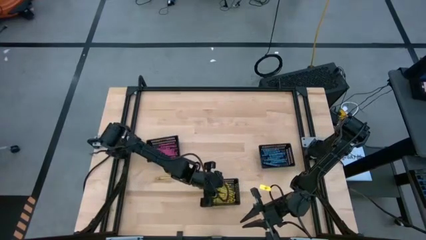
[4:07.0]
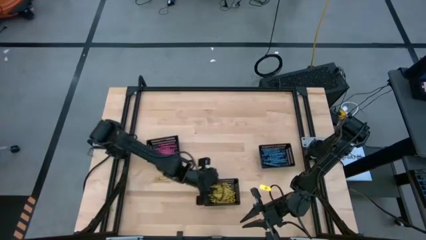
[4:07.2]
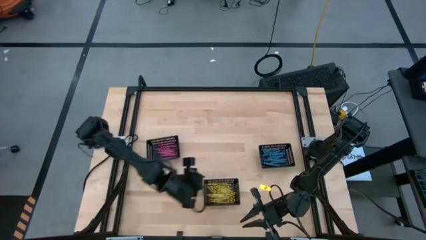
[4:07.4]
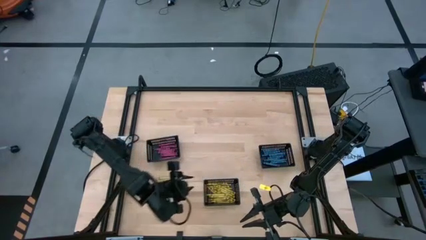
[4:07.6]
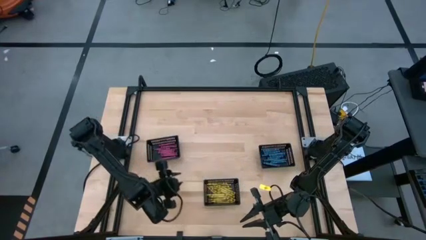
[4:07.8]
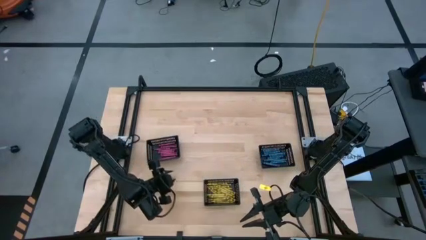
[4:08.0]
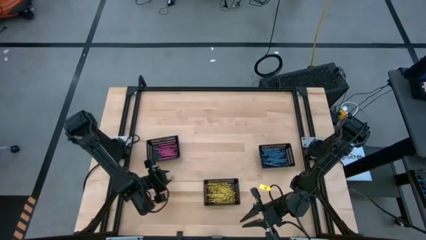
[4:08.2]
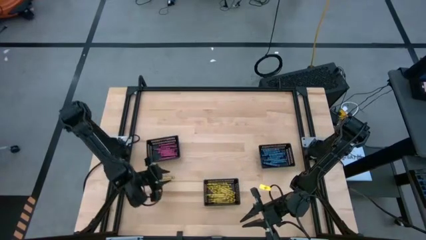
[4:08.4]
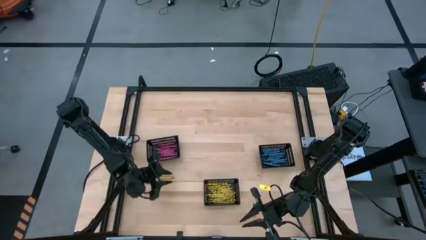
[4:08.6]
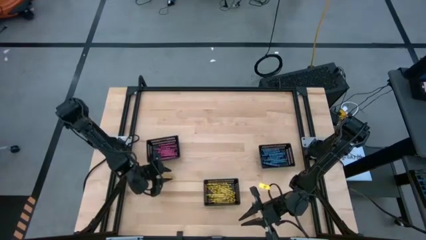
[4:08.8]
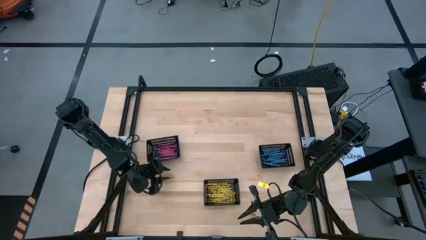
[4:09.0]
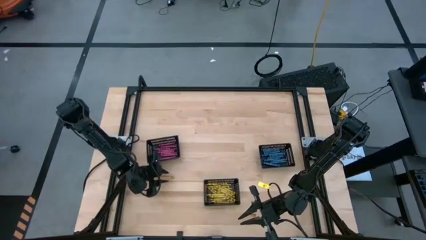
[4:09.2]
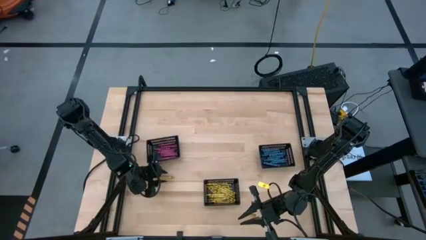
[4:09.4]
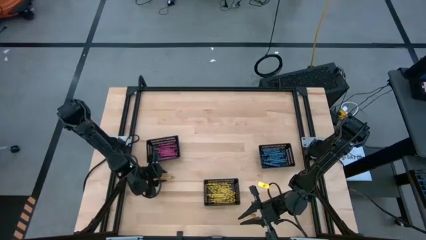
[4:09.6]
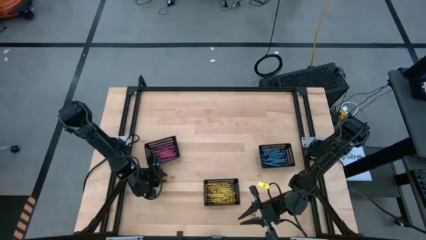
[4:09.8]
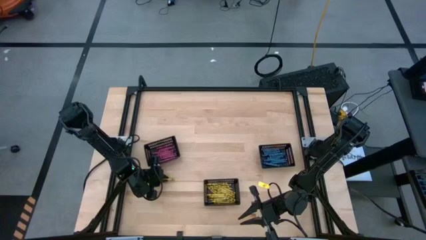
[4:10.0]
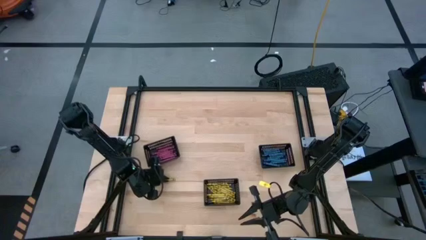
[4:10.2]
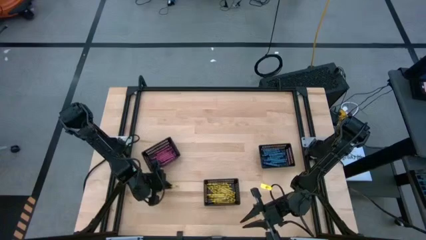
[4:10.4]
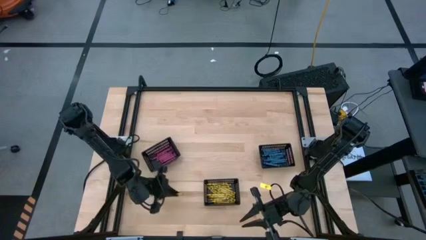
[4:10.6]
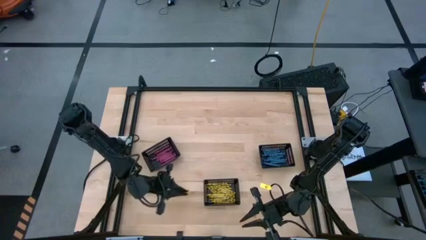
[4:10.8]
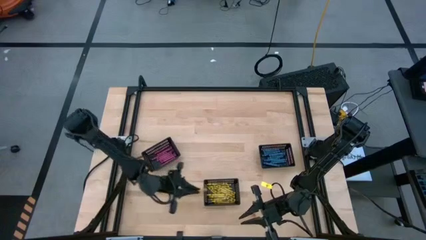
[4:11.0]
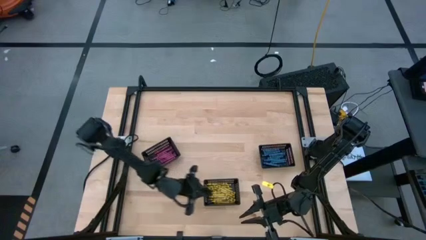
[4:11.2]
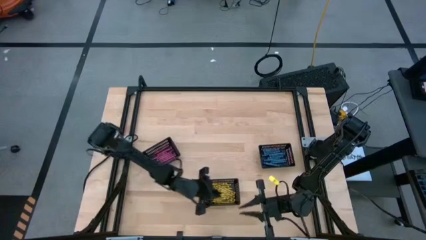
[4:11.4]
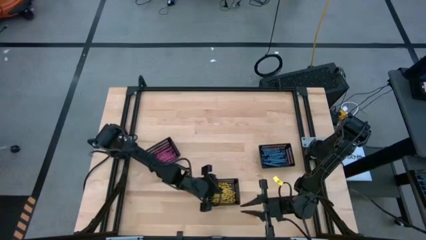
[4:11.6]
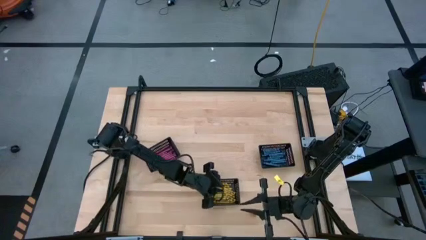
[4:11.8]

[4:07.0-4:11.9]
Task: Sort crayons
Put the yellow crayon into the bottom black bin

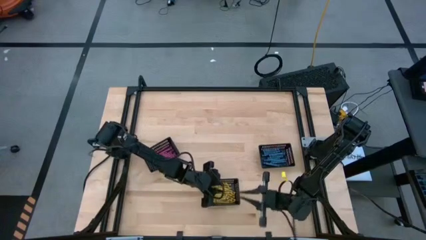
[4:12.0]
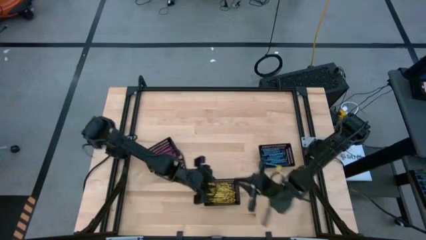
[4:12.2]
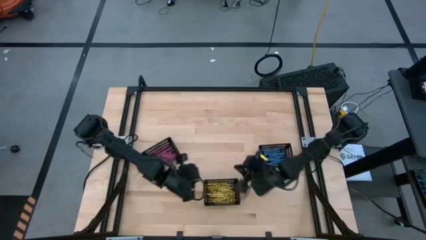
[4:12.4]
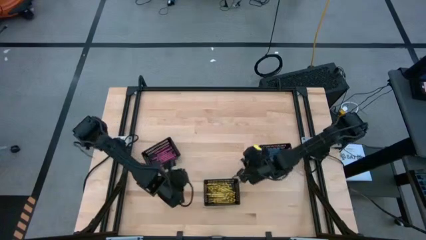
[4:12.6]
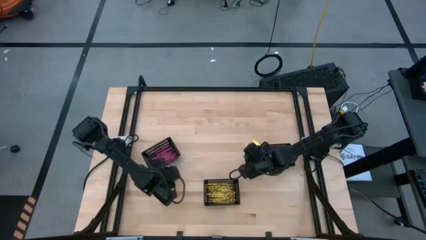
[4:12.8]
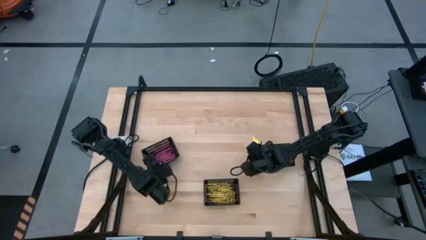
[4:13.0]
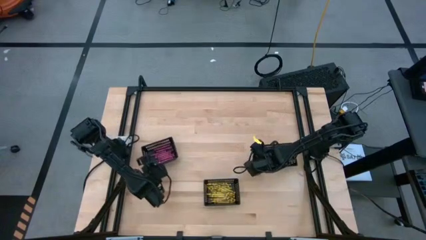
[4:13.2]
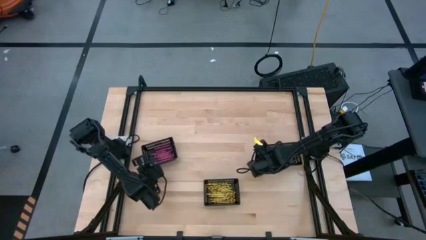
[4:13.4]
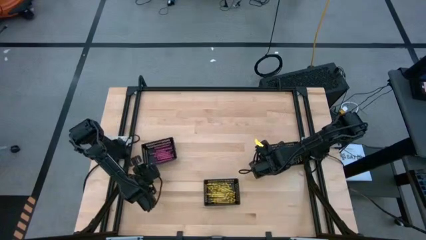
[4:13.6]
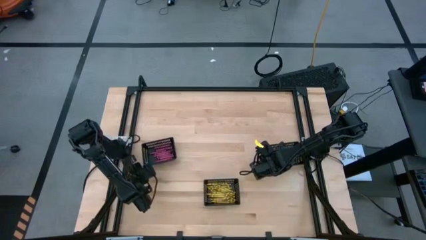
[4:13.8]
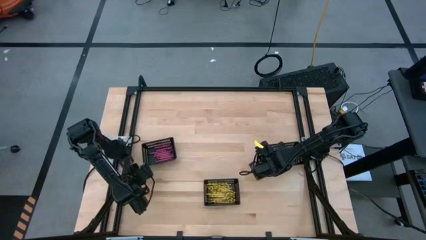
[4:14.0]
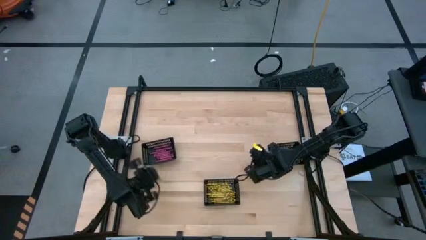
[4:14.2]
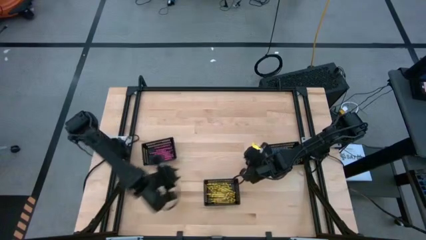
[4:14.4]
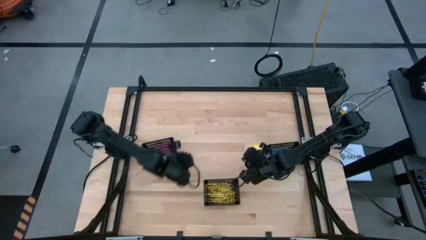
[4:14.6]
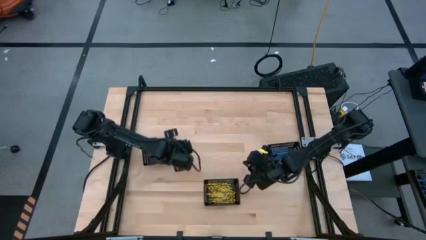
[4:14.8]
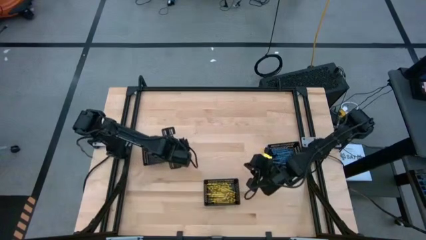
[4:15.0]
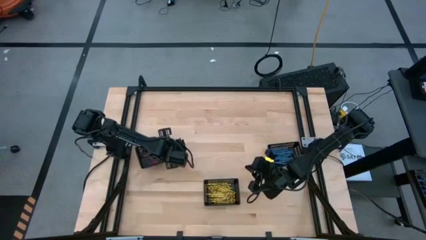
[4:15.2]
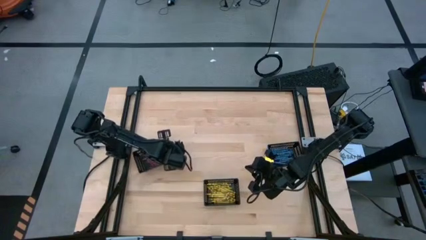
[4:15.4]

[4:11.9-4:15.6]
Adjust the black bins

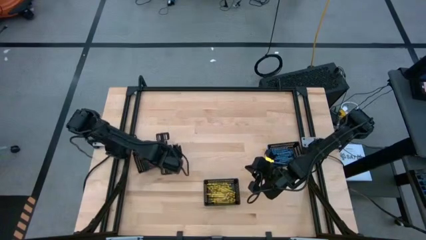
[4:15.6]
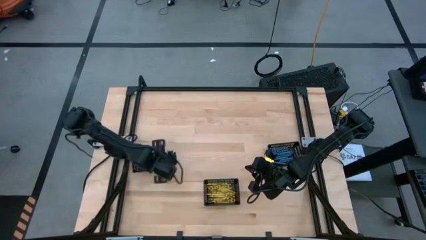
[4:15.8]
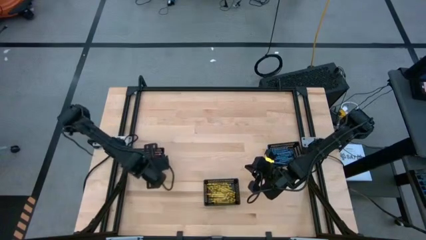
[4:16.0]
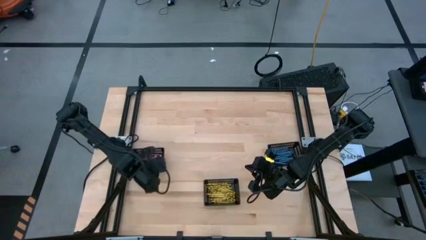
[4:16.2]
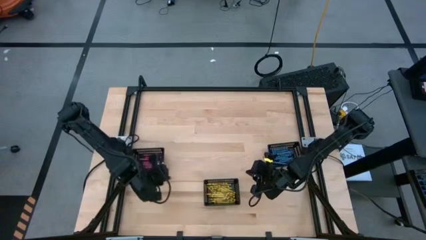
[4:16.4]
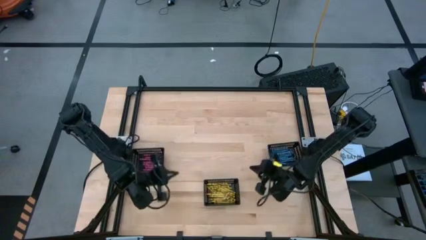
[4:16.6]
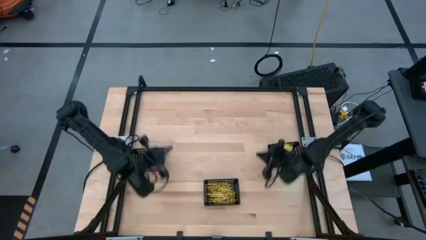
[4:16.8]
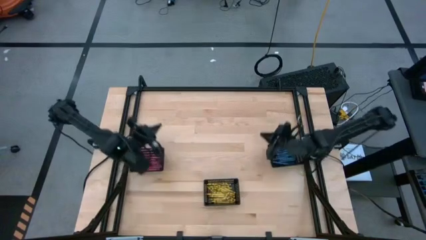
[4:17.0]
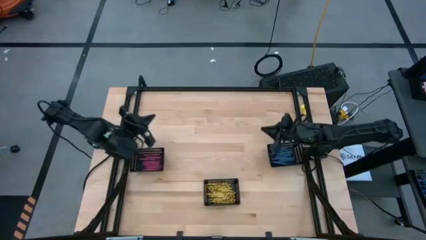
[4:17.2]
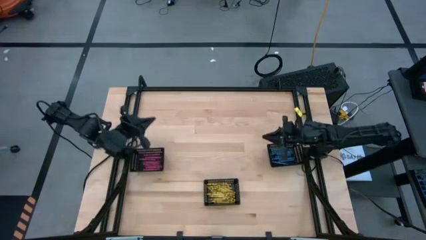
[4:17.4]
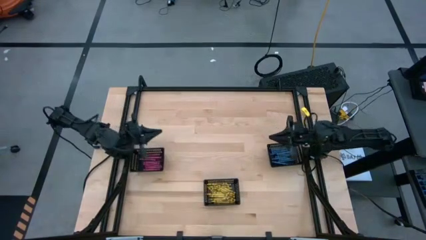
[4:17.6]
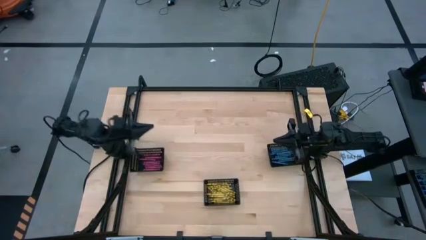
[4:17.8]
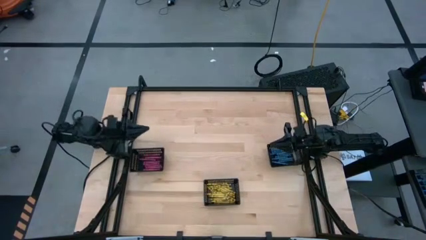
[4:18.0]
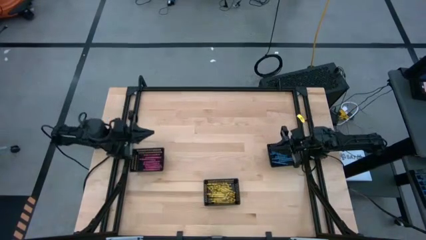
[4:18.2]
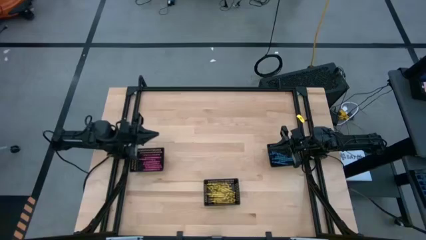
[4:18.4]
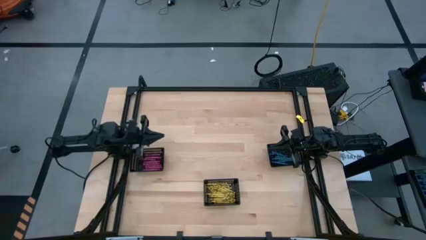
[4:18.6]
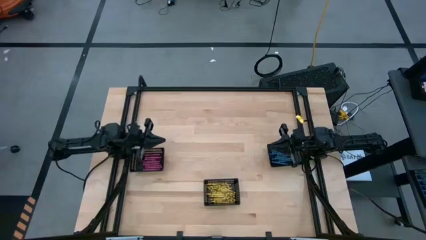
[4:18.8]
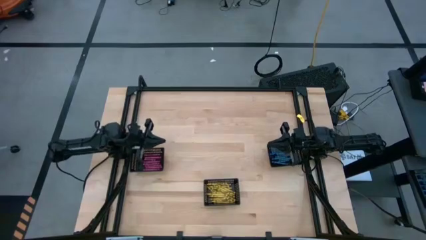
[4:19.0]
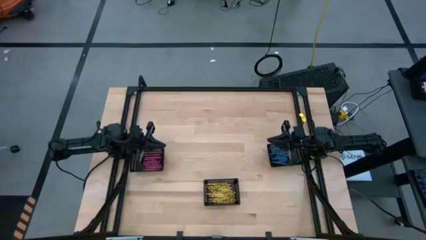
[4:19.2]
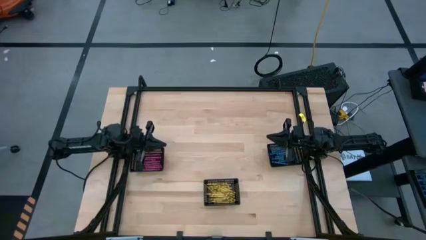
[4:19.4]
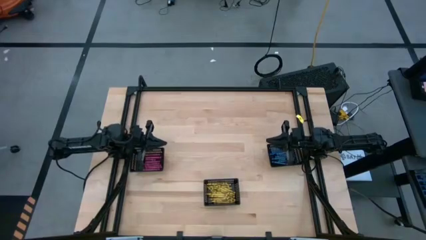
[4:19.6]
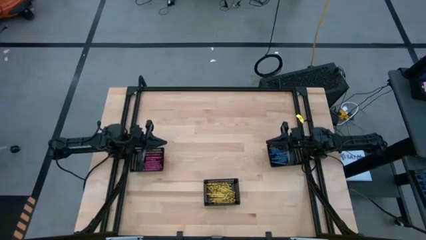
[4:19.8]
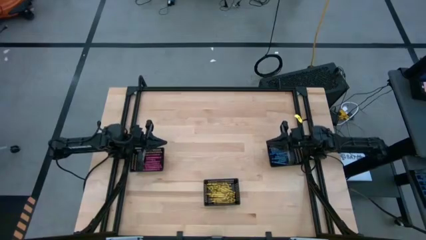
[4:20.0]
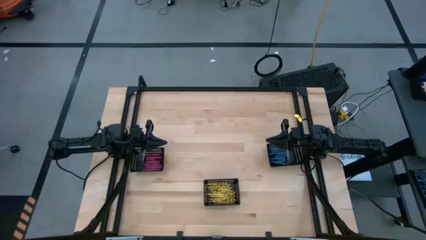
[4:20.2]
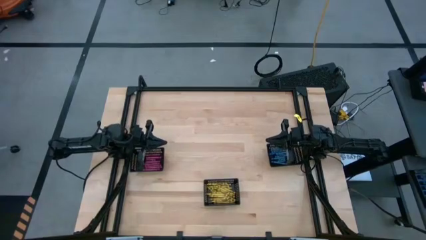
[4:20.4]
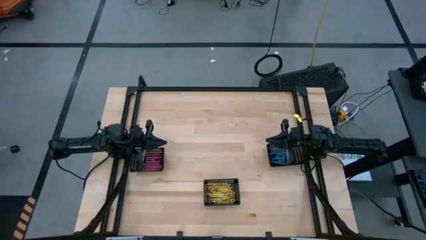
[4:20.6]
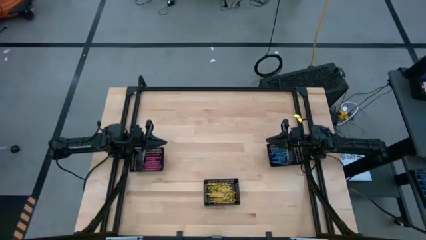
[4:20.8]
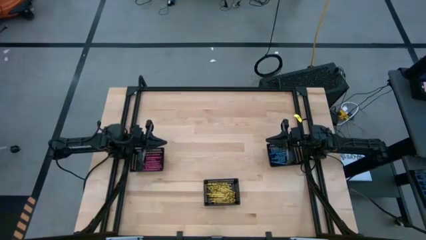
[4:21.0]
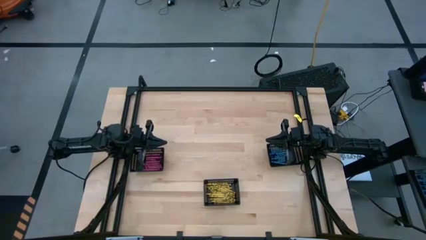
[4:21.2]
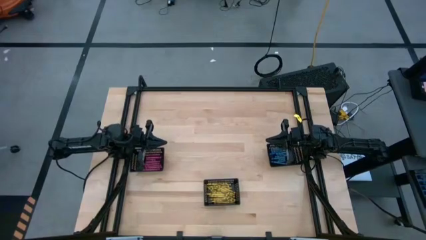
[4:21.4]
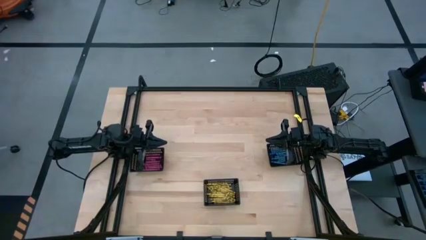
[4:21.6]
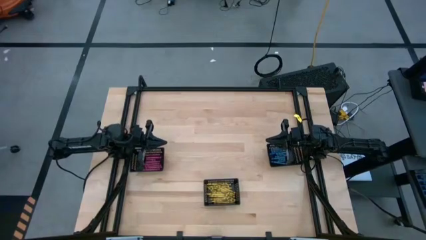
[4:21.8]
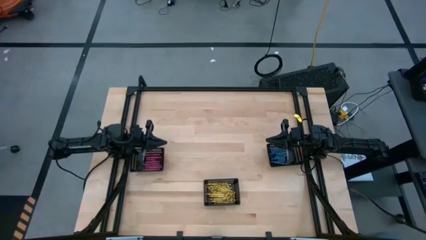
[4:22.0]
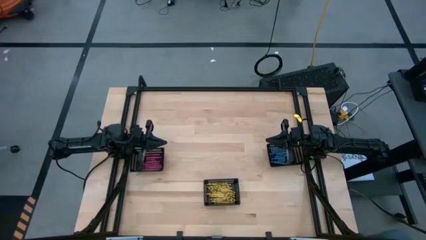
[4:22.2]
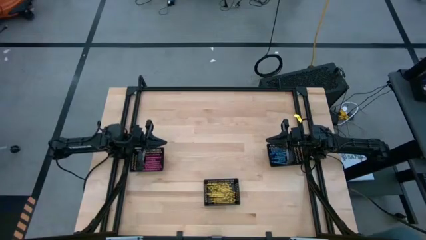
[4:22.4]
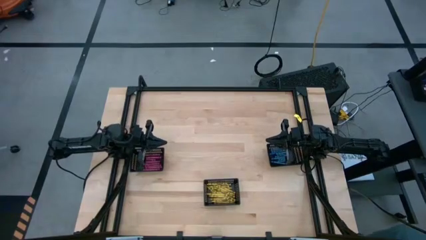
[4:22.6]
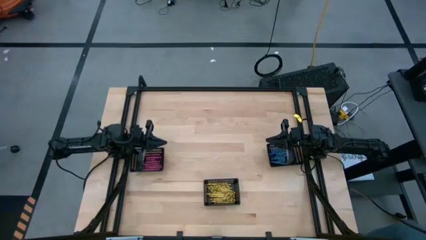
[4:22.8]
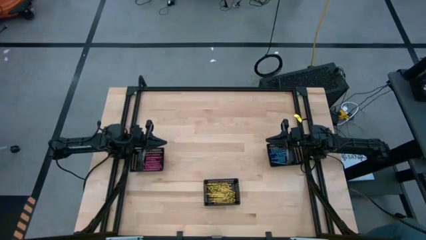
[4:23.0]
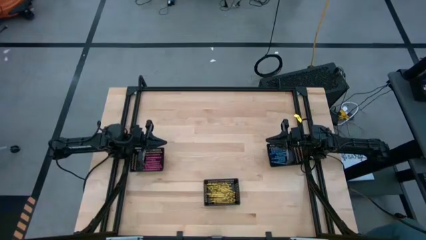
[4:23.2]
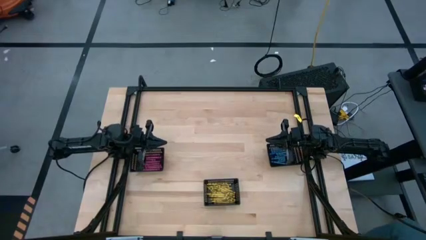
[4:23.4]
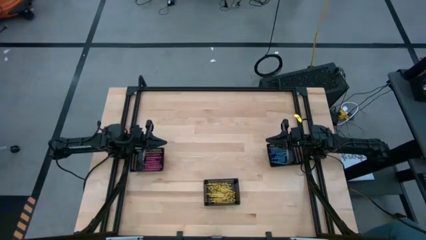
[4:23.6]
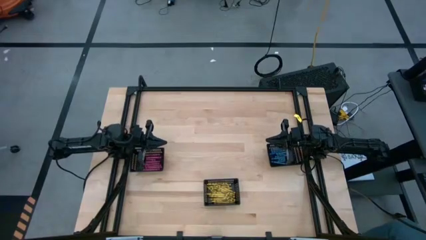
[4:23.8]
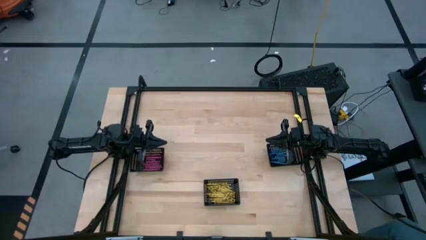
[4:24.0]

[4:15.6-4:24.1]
Return to Home Position
